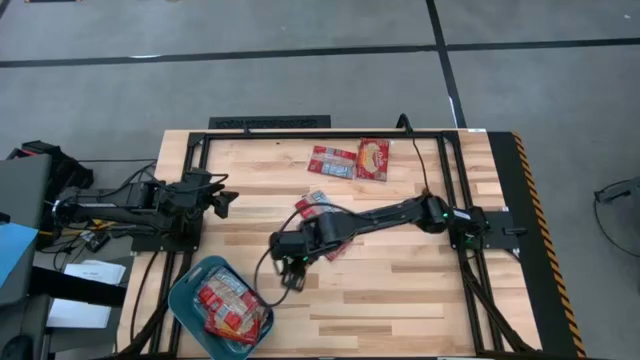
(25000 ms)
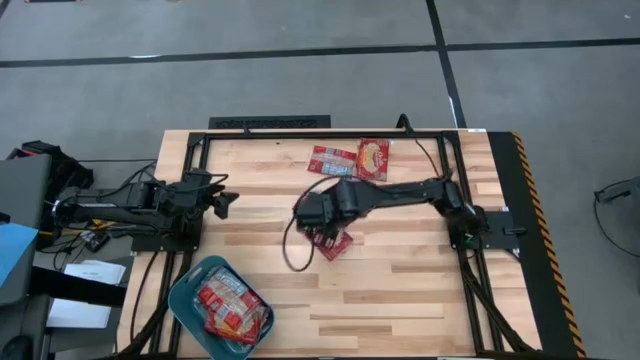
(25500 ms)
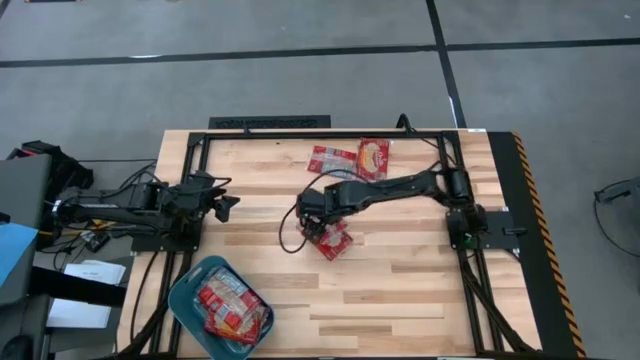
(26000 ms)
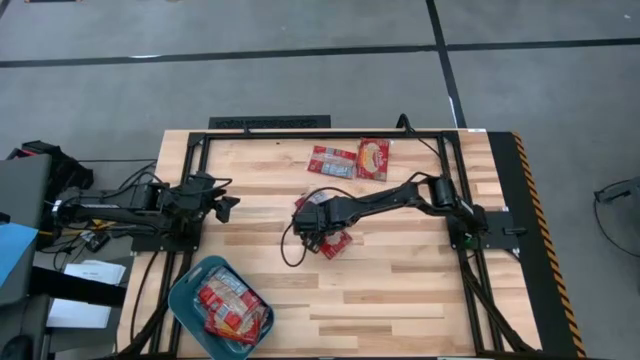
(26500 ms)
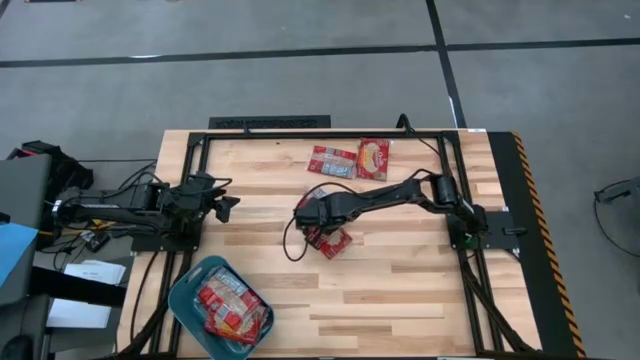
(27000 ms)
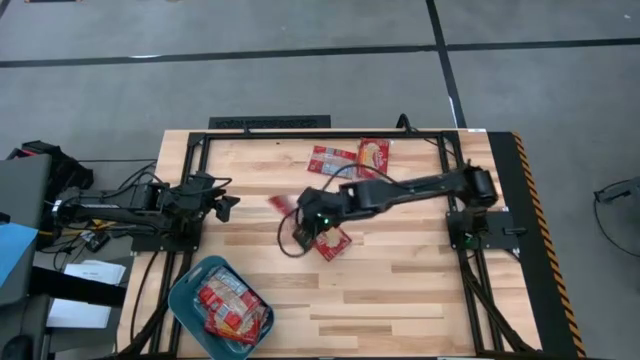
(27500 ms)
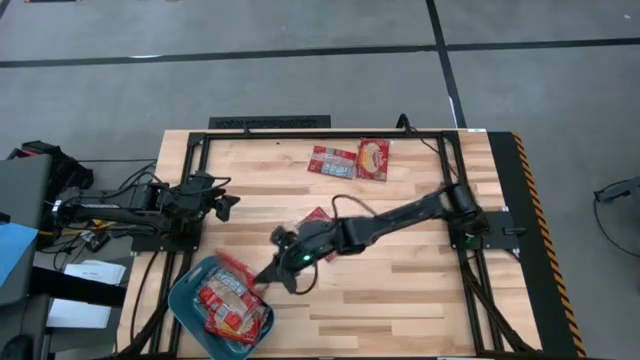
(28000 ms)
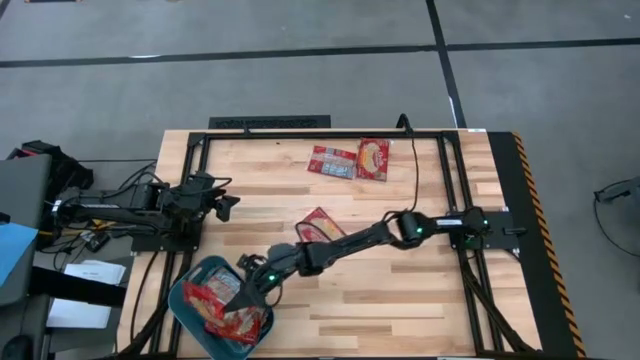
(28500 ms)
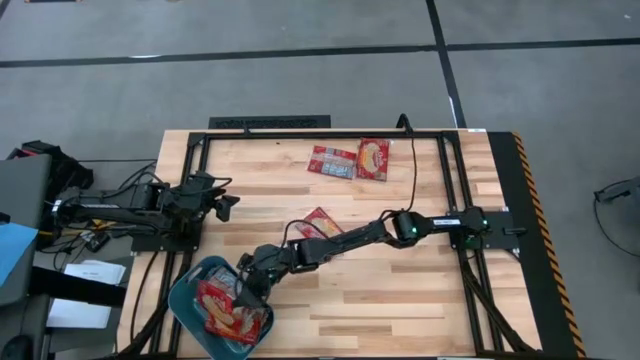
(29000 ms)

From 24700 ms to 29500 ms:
Task: Sort popcorn bags into baskets
Put the red popcorn pack into the blue bin

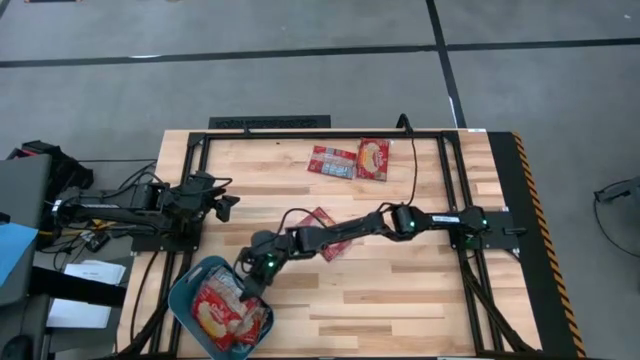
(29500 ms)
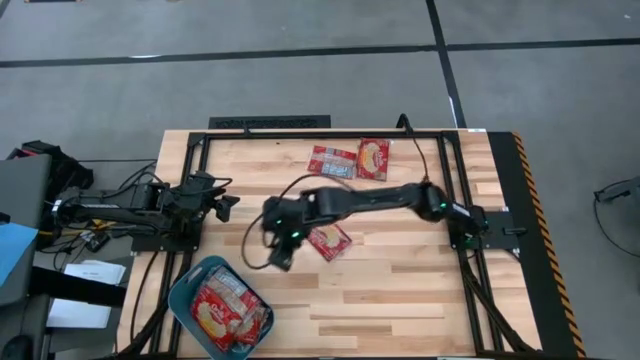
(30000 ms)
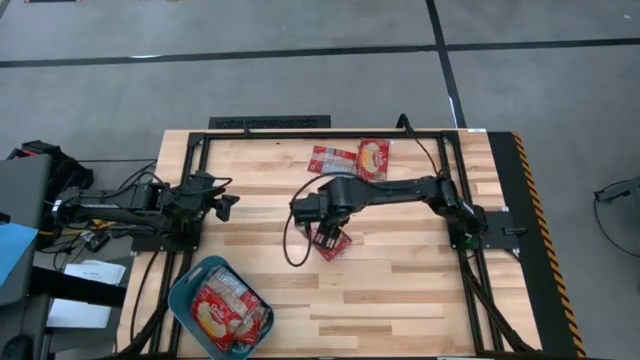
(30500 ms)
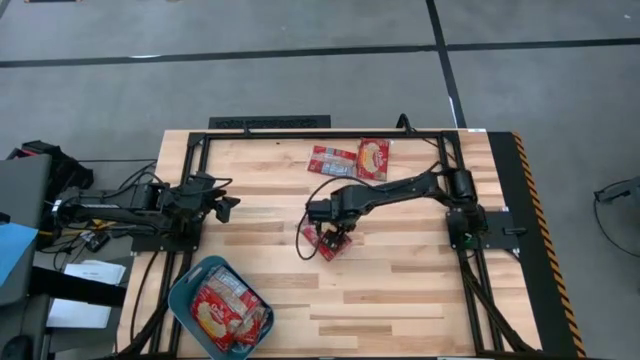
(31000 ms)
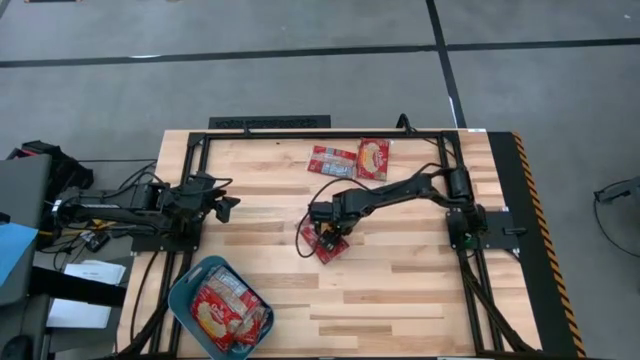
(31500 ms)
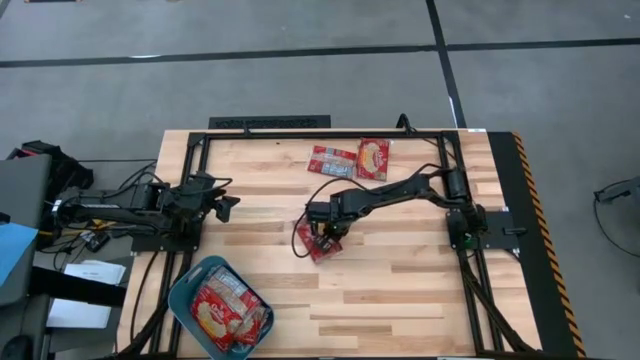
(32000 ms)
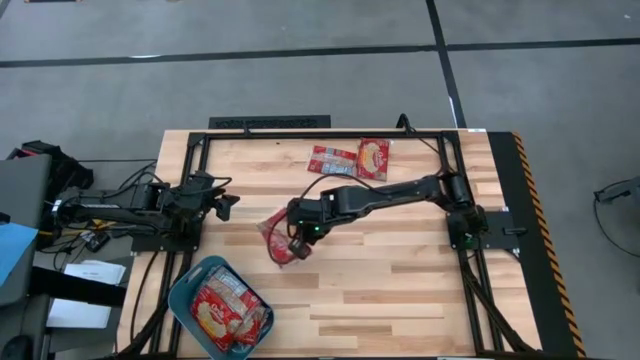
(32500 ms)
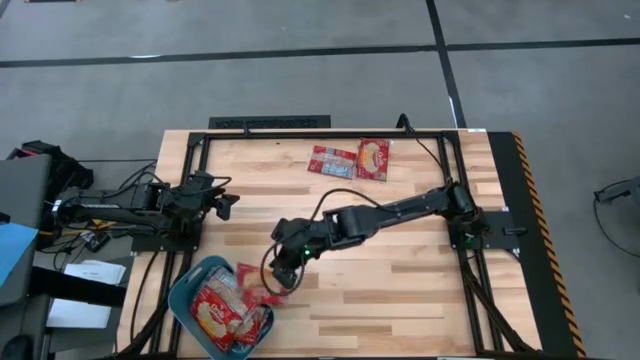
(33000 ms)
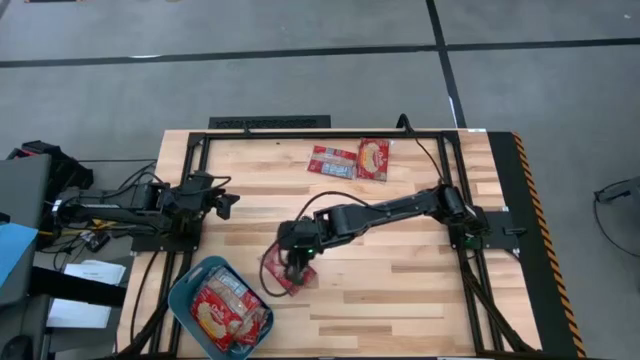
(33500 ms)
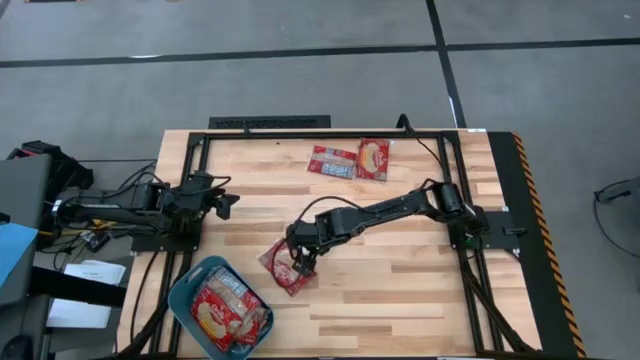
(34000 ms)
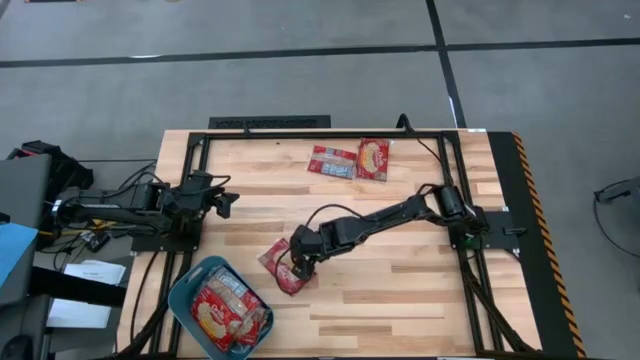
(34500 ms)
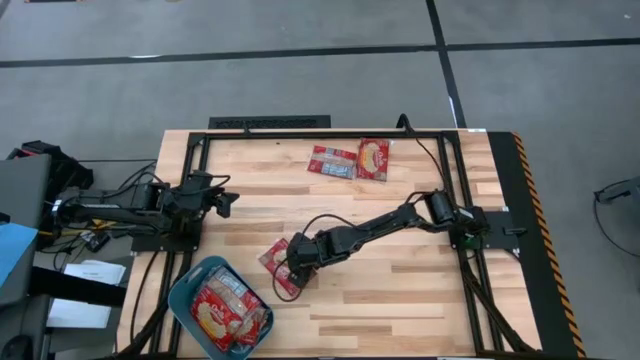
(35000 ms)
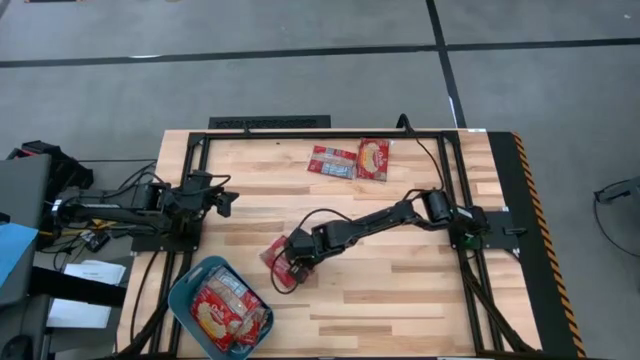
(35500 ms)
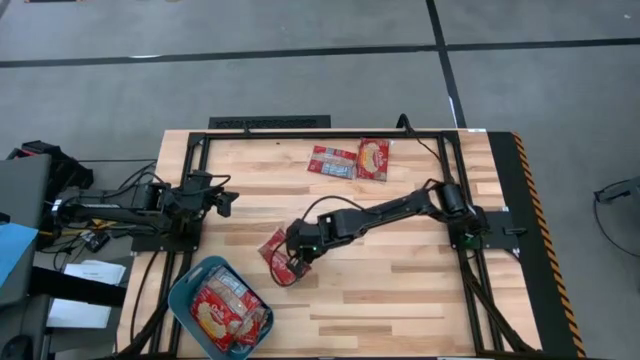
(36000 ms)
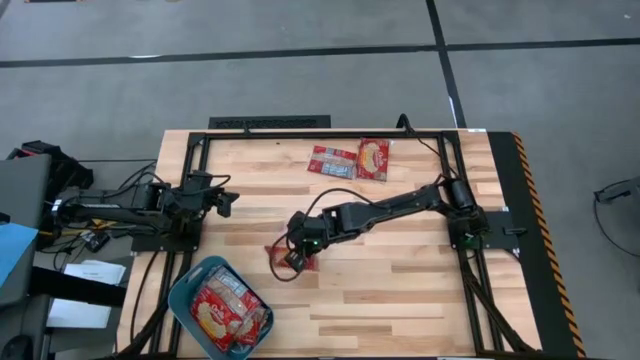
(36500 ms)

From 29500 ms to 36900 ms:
Put the red popcorn pack into the blue bin

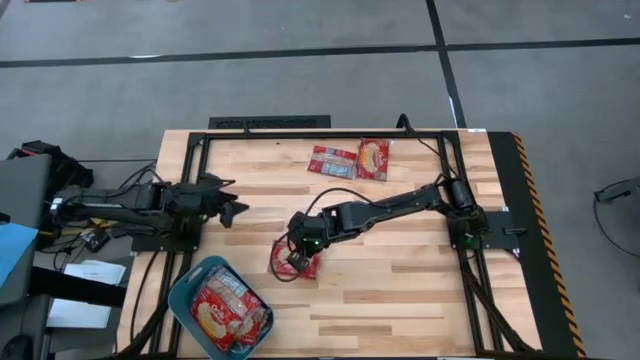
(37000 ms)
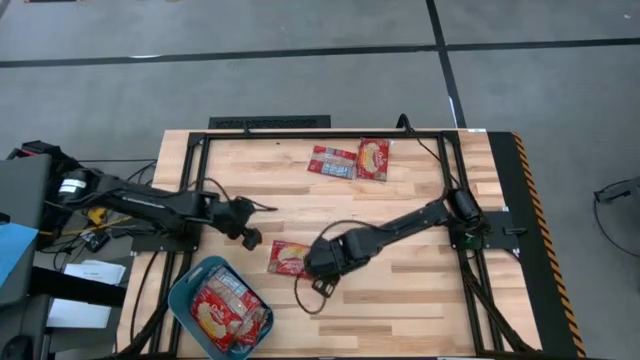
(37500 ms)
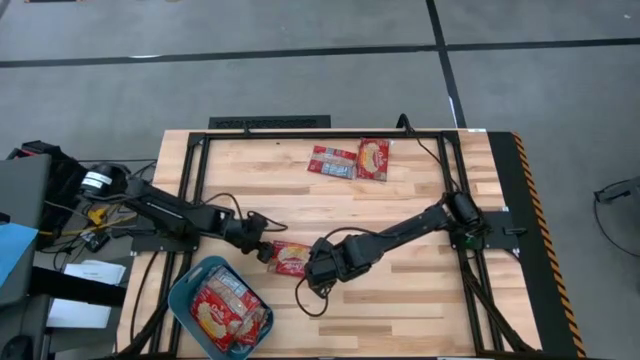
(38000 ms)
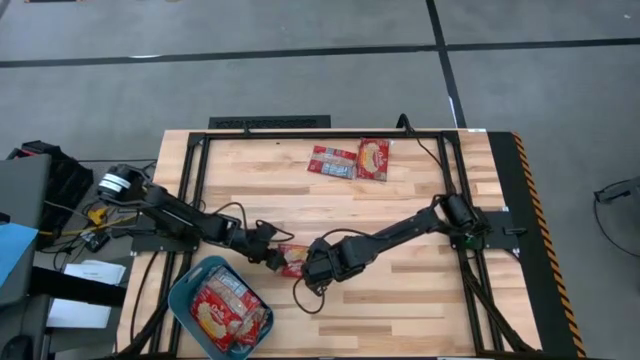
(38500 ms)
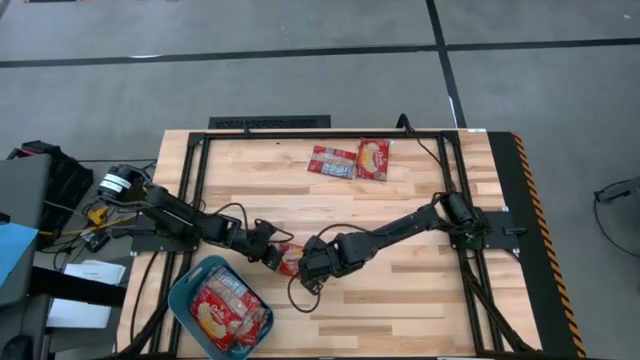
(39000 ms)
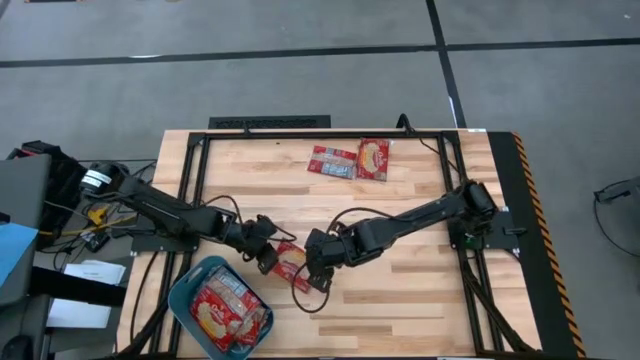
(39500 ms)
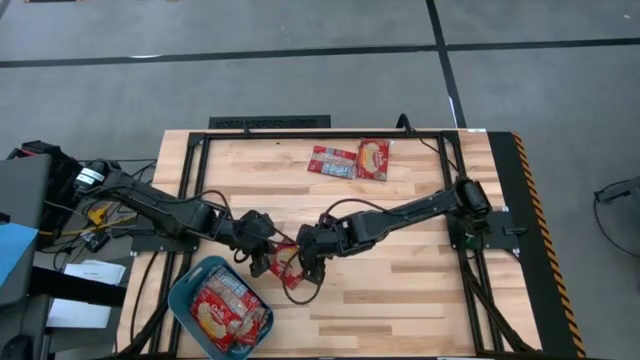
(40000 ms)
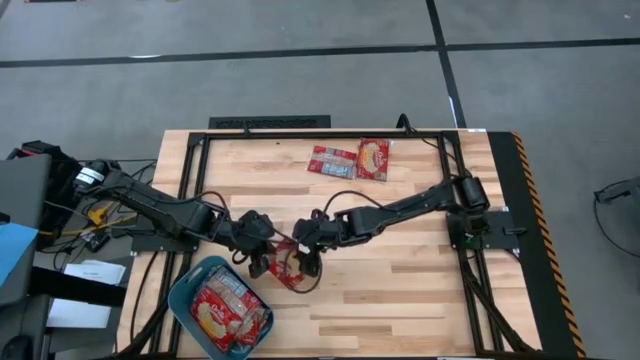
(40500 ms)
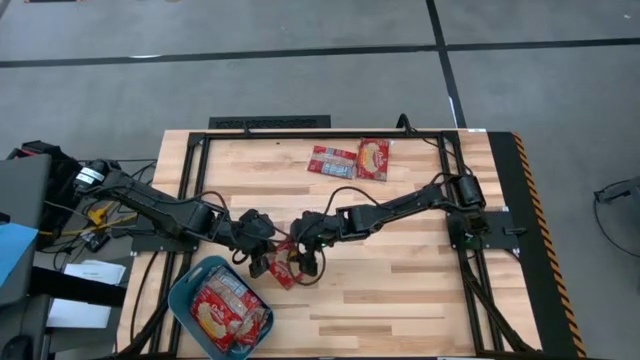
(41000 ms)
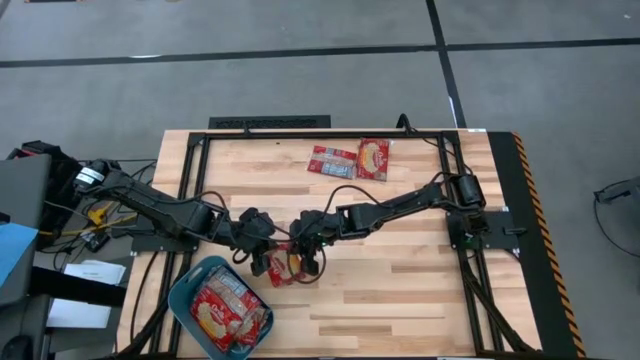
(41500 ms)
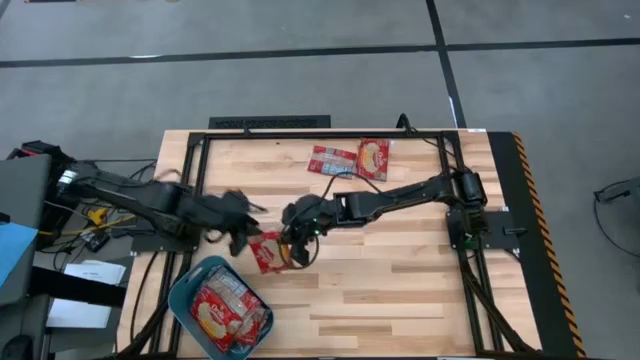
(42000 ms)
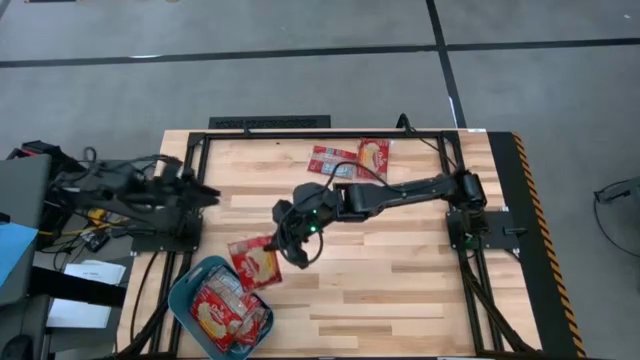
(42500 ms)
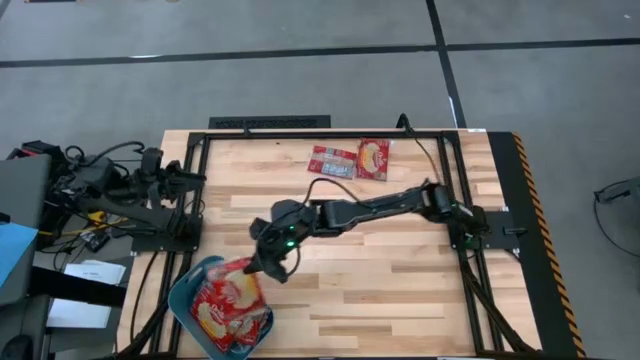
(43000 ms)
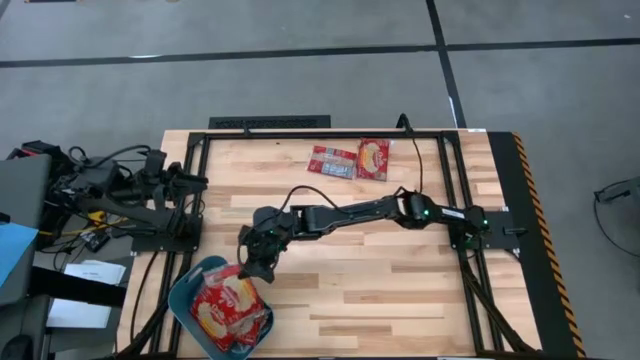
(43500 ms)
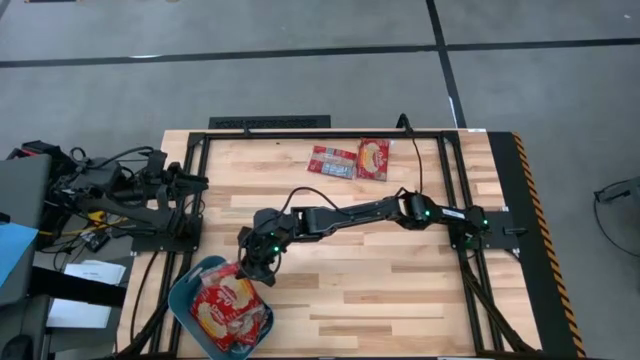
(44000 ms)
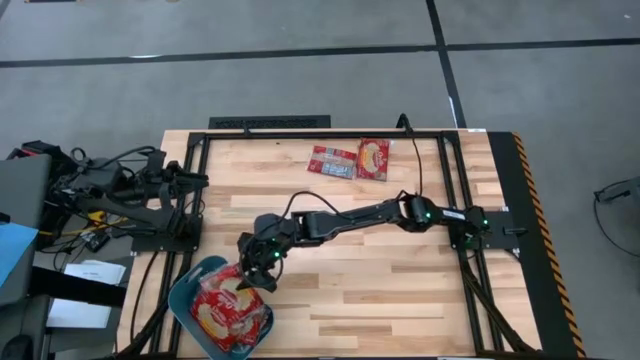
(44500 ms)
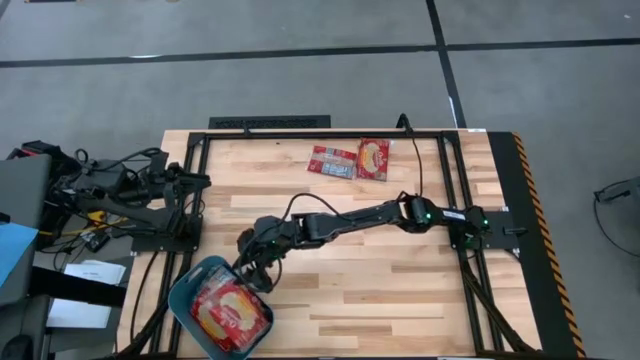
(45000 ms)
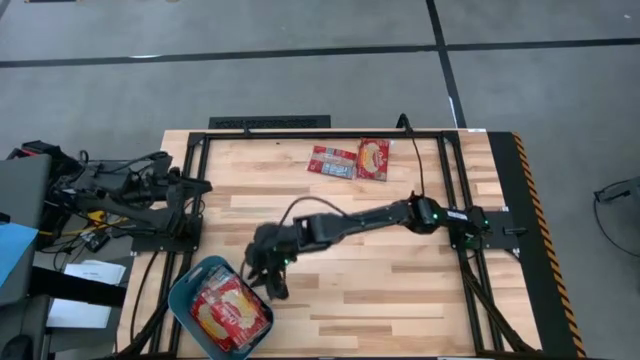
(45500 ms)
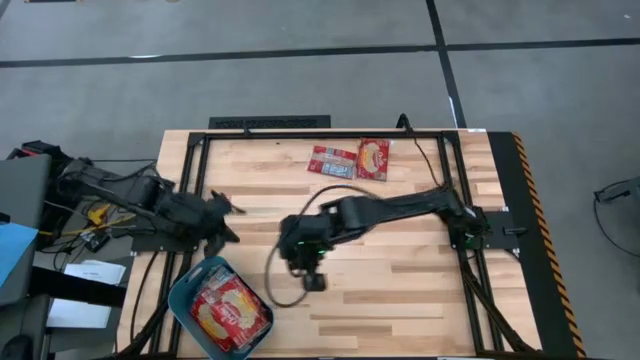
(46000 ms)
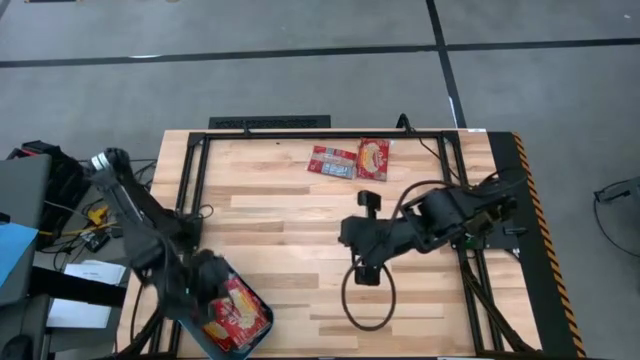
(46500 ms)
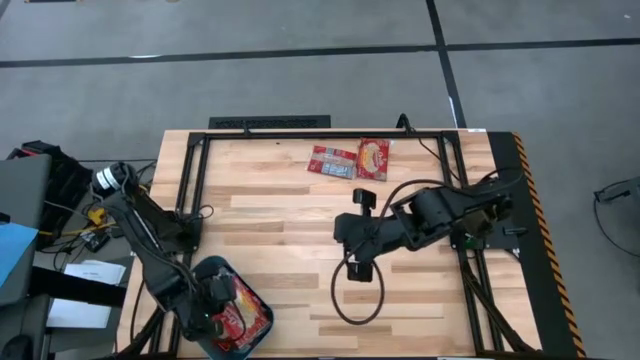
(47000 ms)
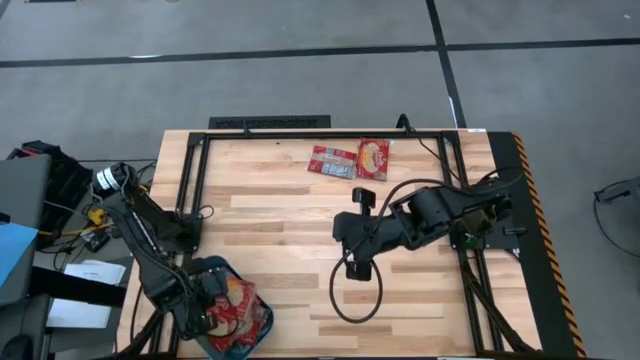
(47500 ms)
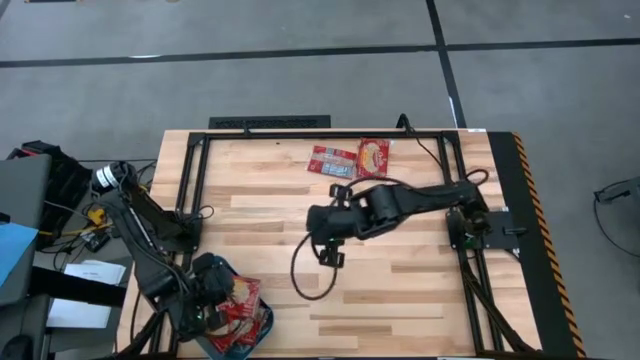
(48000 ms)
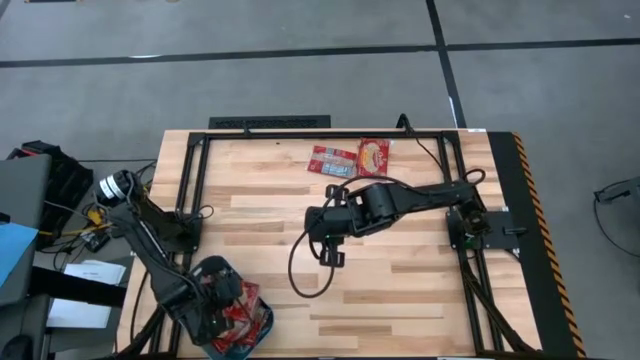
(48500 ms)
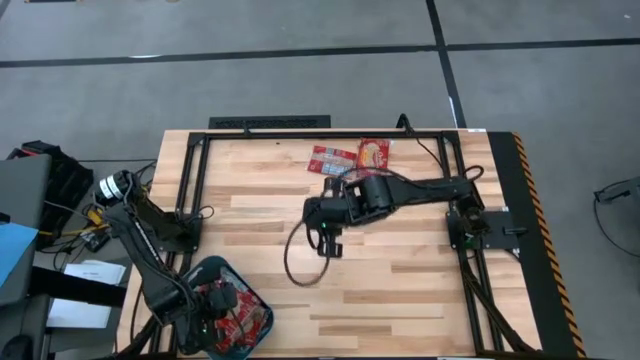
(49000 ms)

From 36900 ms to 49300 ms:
Put the red popcorn pack into the blue bin
